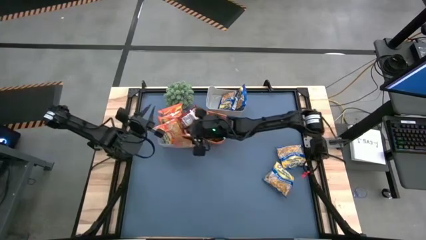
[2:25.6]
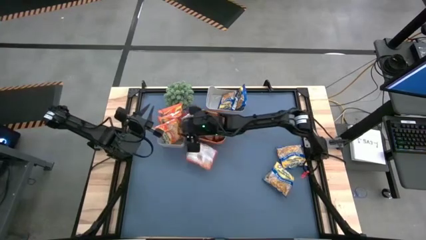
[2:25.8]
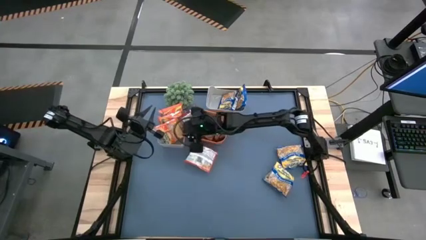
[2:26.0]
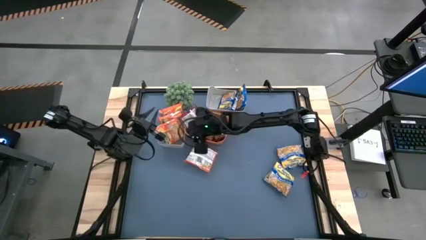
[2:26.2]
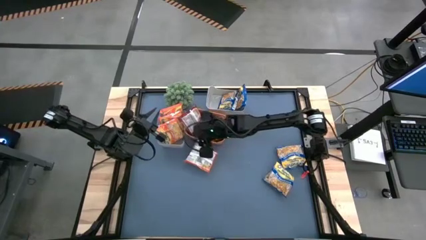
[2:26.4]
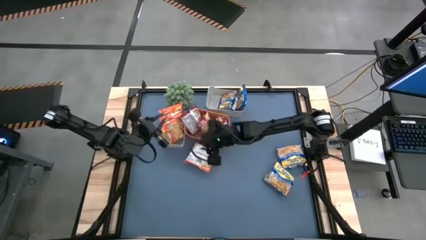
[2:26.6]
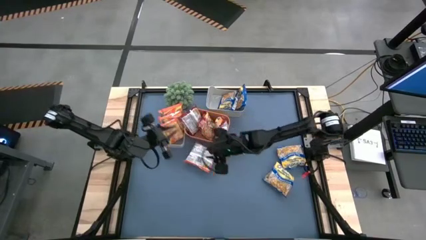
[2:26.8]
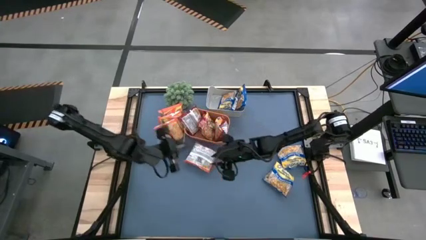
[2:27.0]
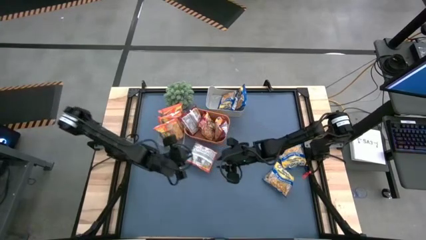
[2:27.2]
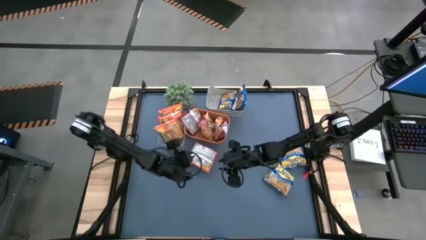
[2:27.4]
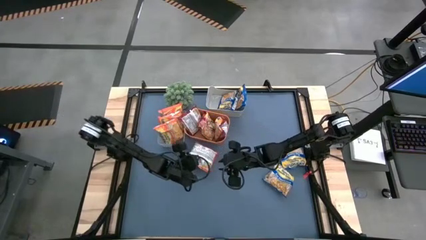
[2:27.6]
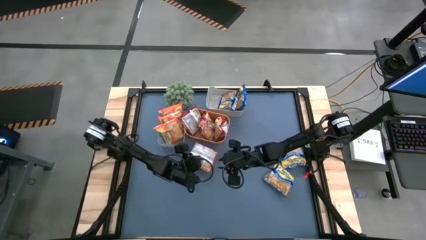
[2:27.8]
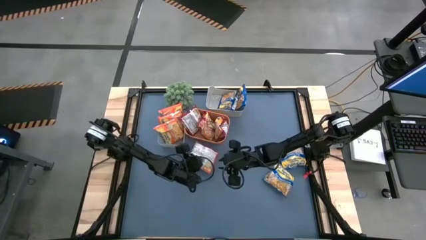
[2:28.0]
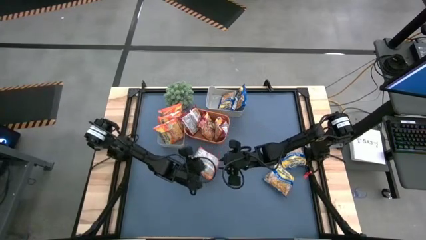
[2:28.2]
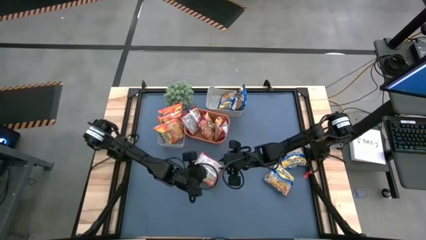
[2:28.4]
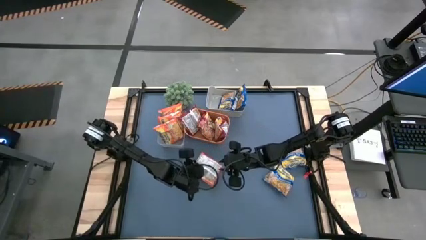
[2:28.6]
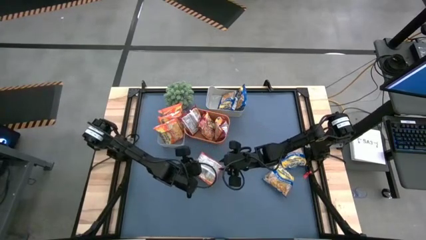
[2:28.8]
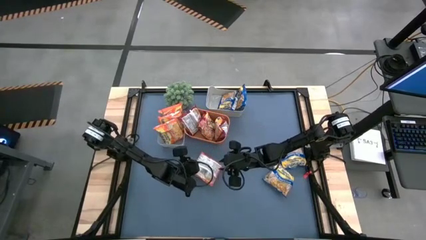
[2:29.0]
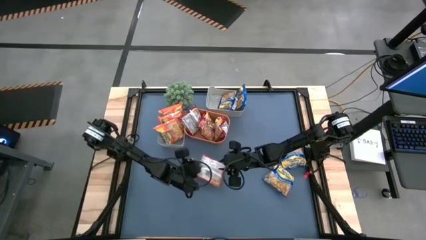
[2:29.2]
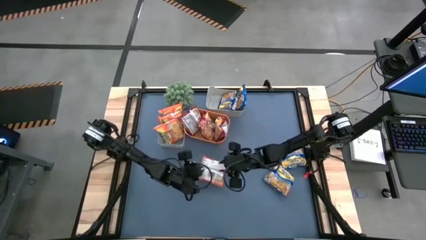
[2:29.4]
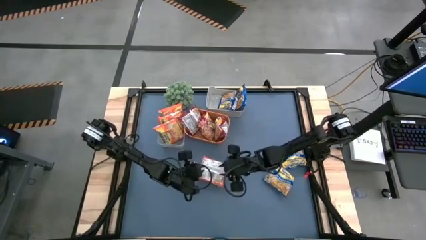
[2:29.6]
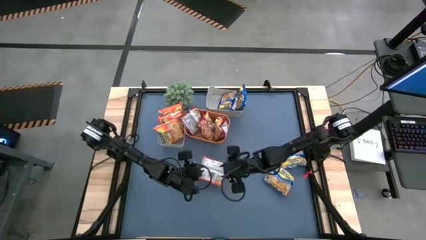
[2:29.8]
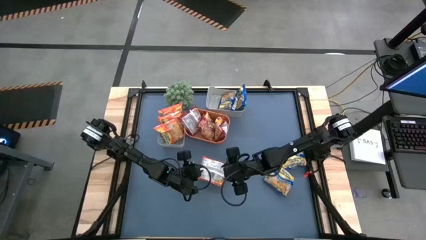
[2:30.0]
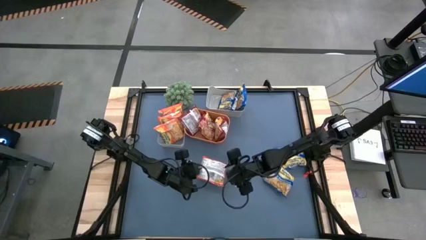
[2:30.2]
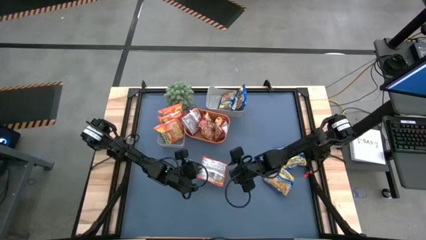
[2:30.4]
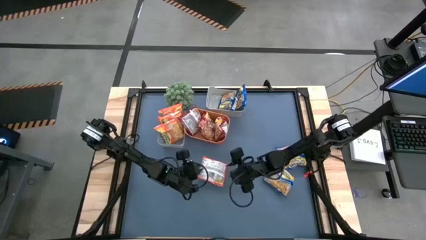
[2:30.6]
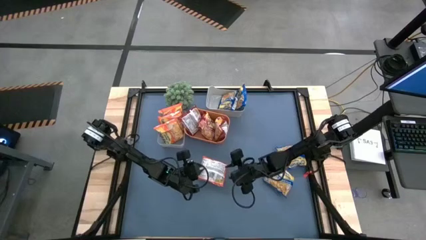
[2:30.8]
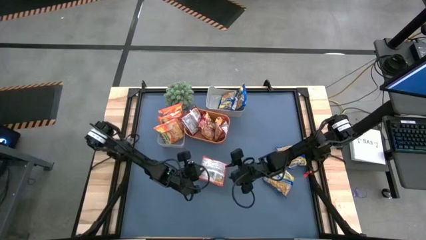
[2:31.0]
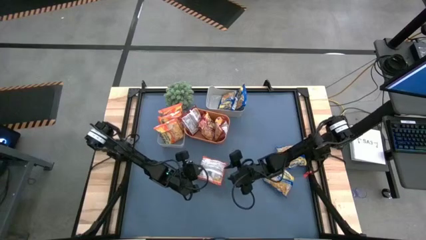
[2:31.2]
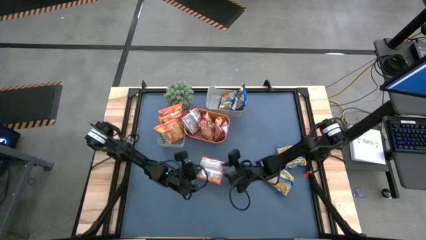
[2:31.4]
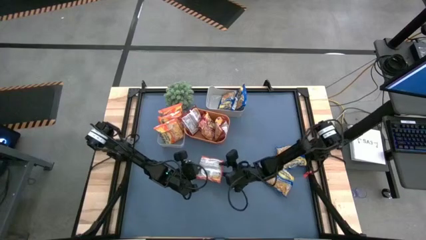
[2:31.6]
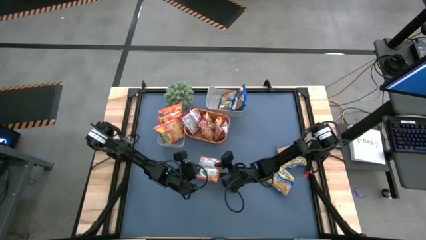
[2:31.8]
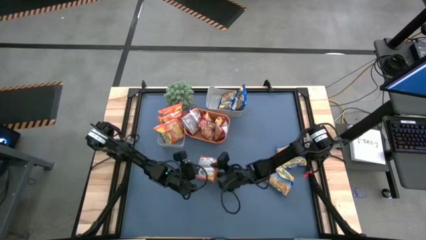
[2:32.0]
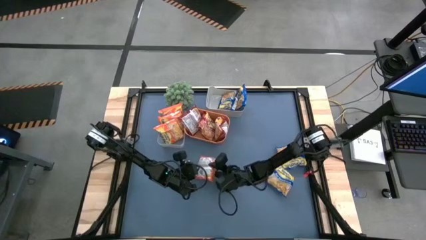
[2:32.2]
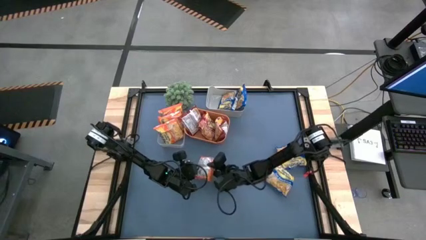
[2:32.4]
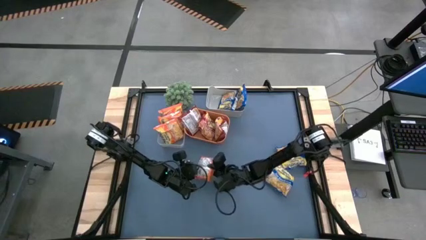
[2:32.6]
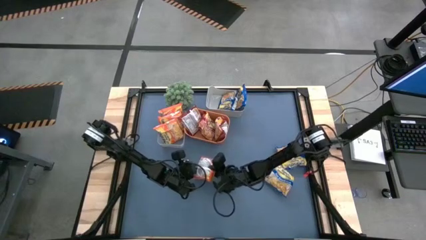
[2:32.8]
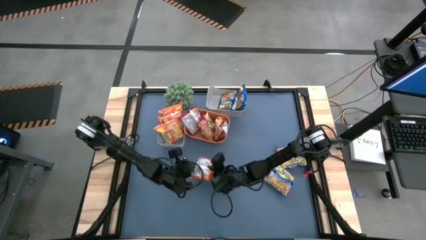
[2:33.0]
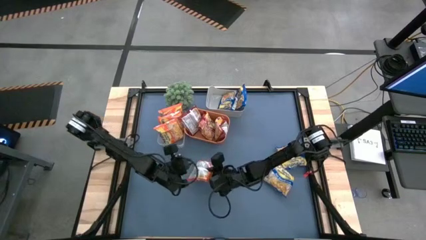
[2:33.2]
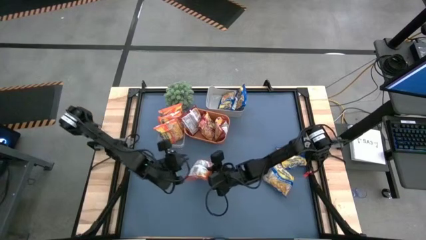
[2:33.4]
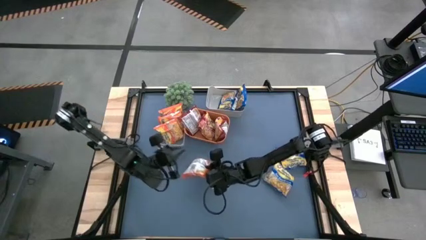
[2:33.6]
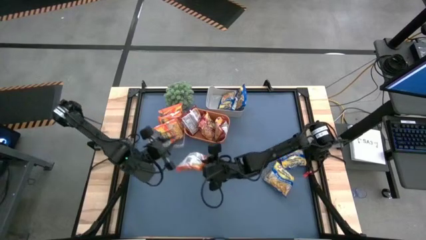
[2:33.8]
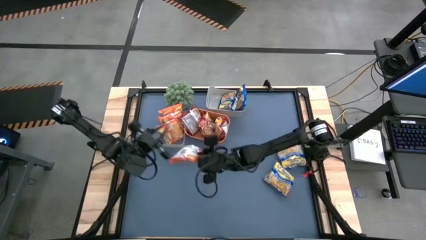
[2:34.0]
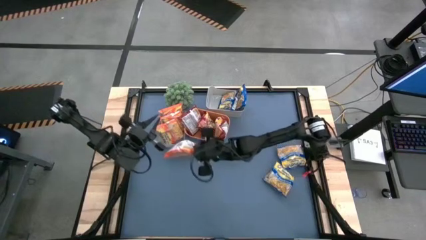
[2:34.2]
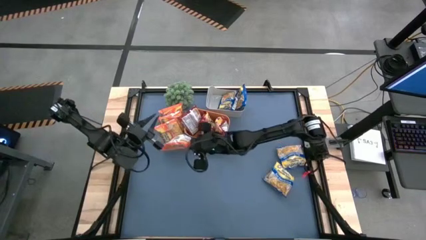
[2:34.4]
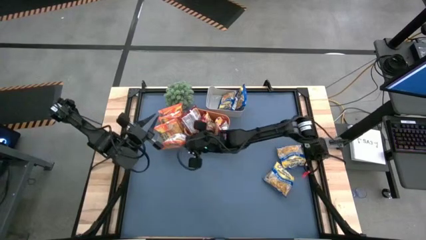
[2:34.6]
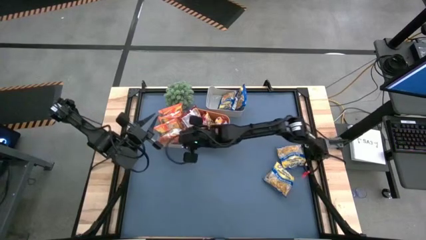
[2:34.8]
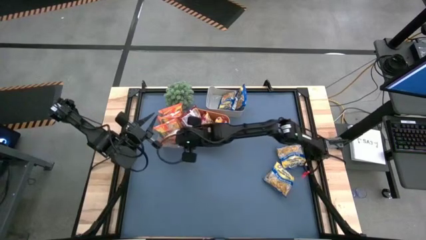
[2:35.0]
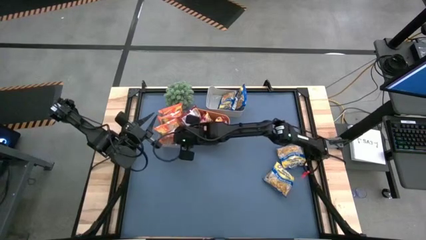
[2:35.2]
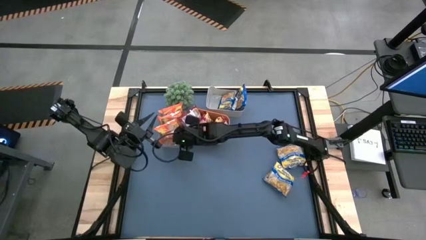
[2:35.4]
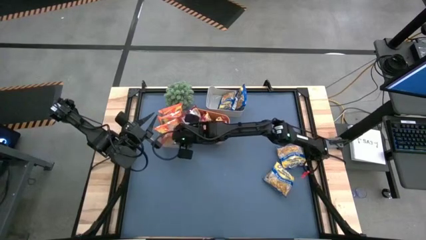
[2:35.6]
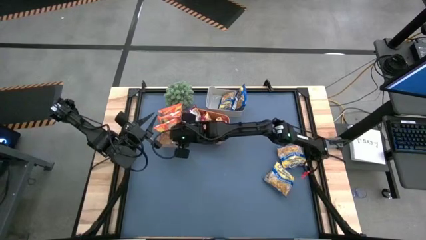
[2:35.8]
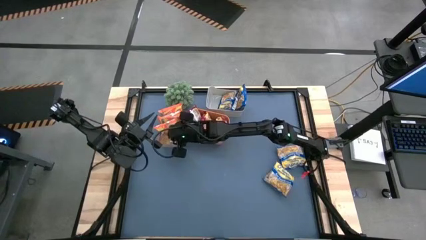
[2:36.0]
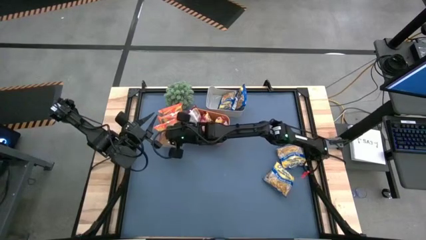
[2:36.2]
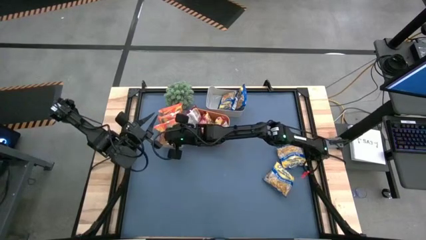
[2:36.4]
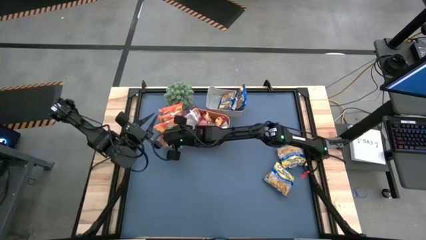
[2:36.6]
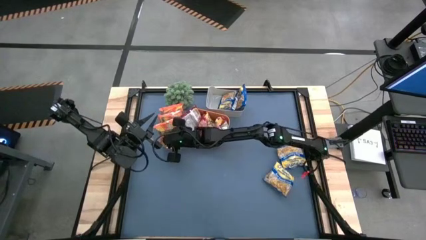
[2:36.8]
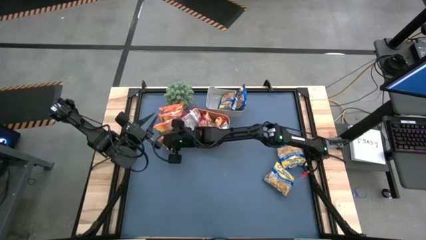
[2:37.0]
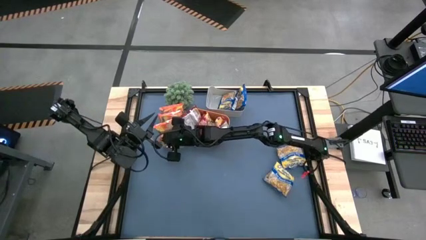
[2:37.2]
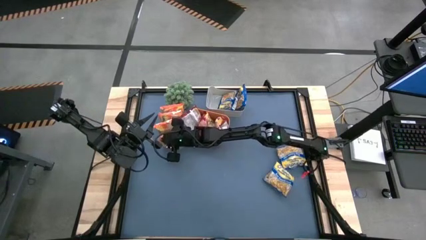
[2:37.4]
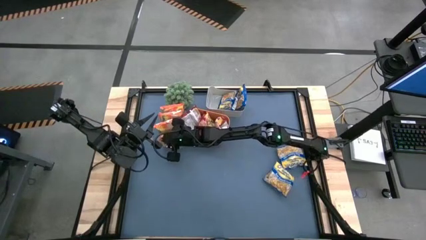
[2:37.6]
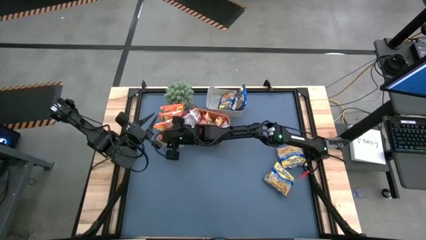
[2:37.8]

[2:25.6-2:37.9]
Task: Sort Maruchan noodles
Put the orange noodle pack into the transparent bin

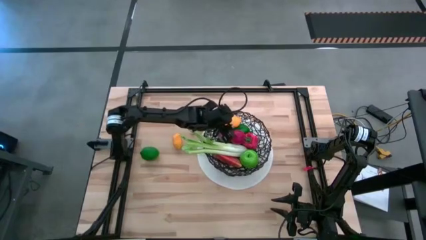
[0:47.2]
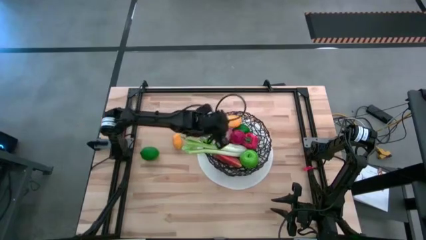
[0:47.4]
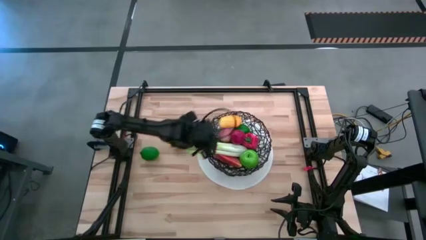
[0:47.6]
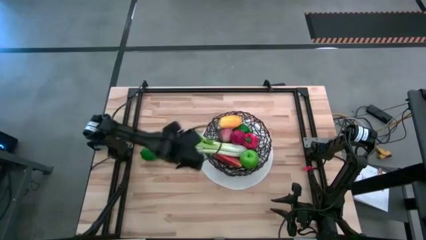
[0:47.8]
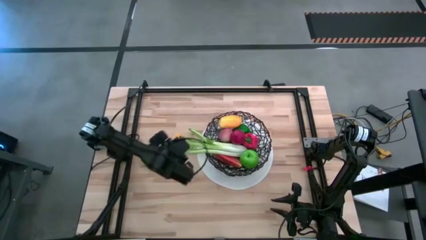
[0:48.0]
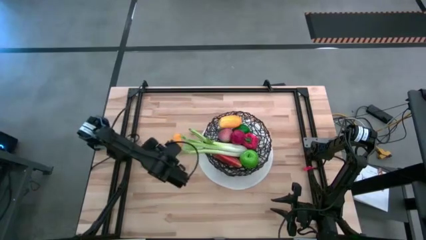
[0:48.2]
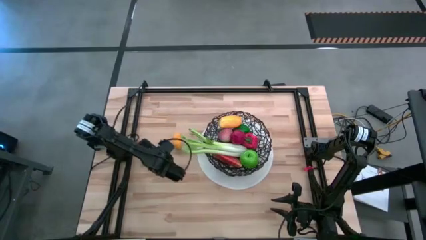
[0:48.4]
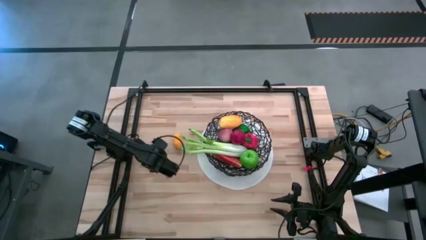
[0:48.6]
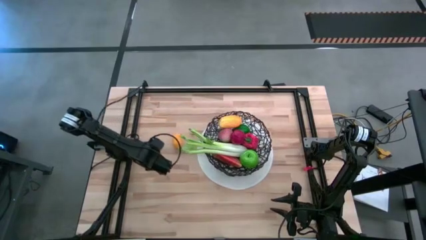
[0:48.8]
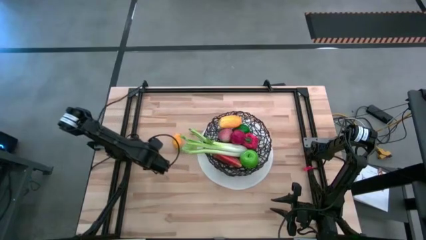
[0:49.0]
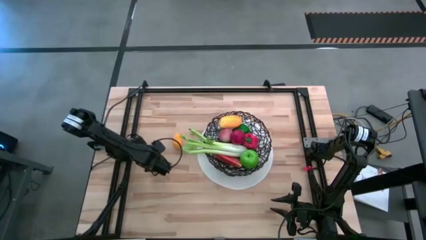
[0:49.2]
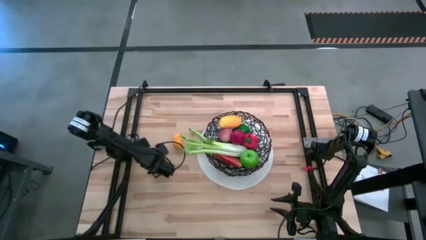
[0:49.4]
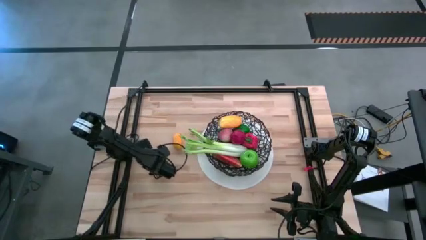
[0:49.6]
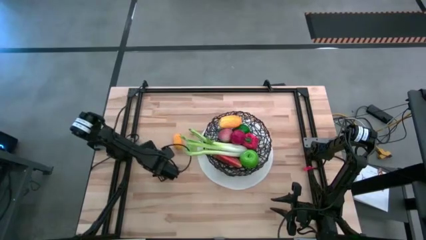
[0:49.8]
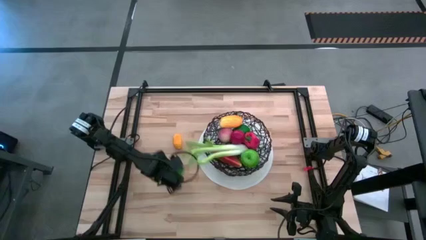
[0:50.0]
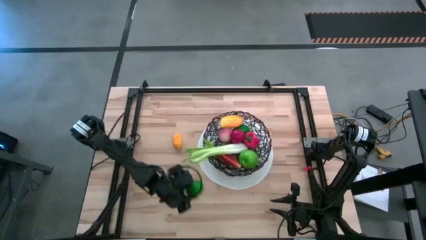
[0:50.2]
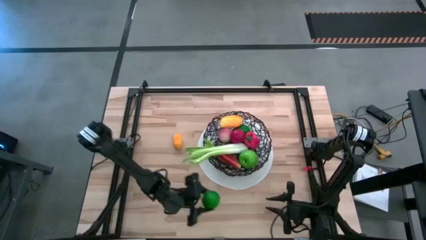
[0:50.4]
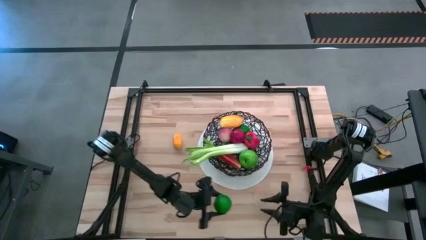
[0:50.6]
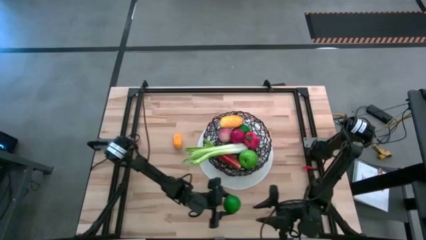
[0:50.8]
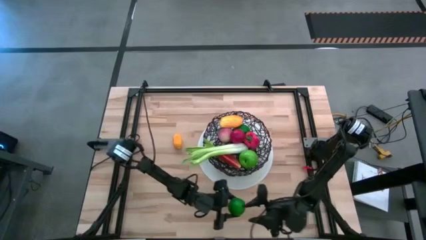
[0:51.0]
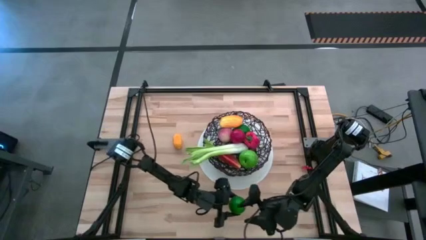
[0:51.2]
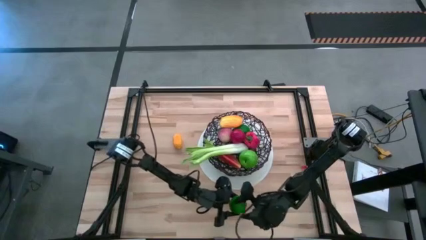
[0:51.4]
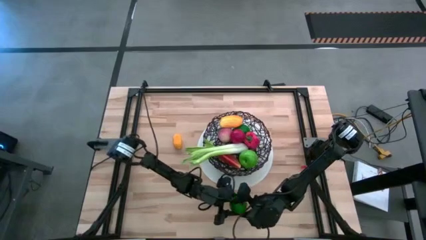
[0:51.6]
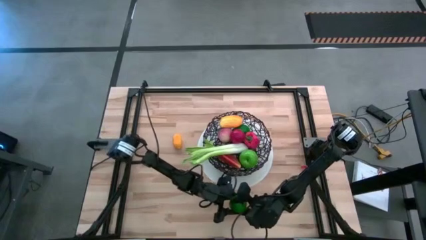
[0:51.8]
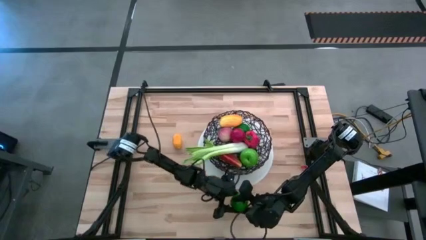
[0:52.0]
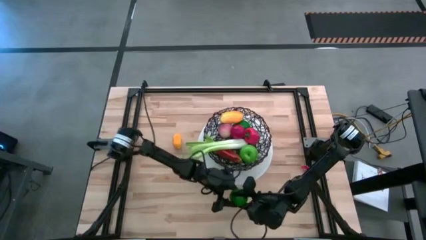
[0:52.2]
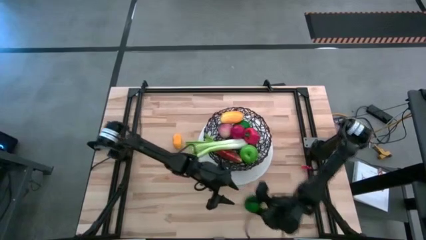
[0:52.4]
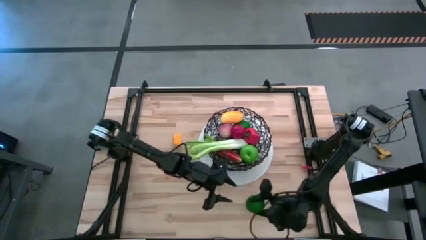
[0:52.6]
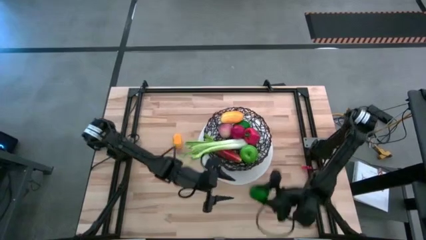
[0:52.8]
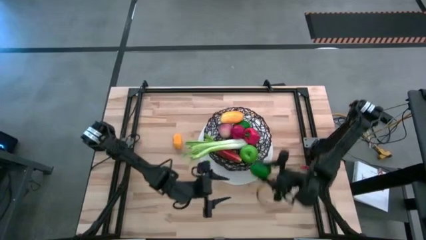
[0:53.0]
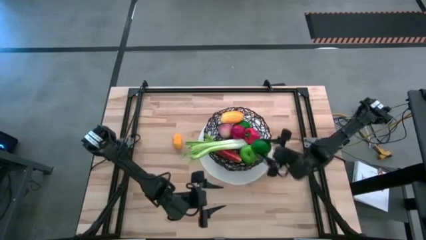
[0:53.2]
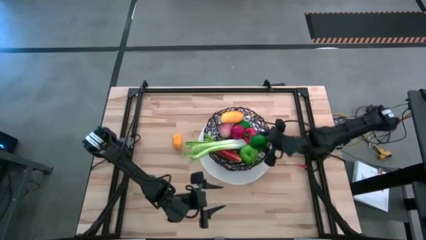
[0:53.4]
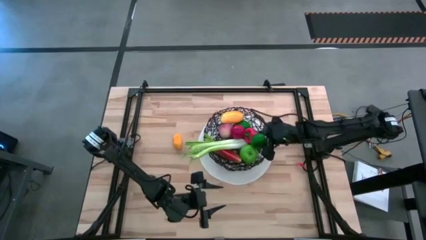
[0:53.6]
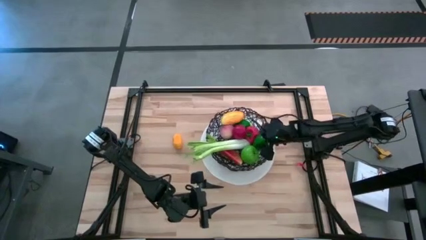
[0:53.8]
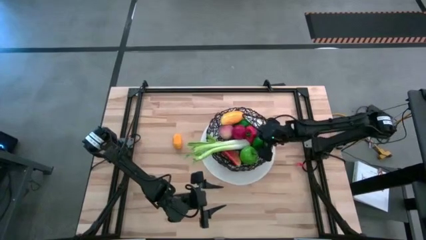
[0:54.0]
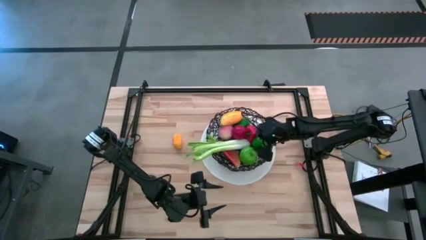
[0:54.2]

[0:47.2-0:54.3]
Task: Build produce basket
Put the green lime into the wire basket
